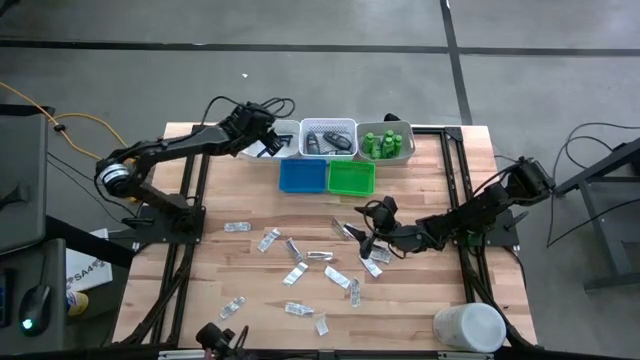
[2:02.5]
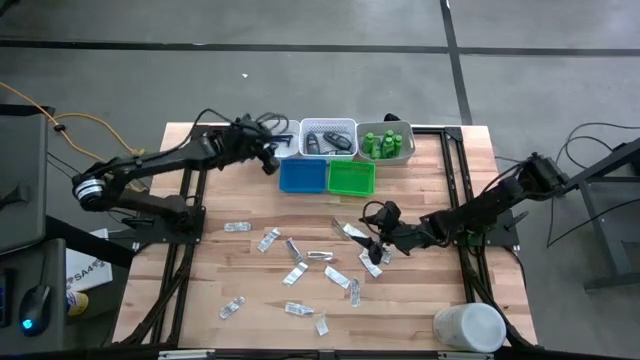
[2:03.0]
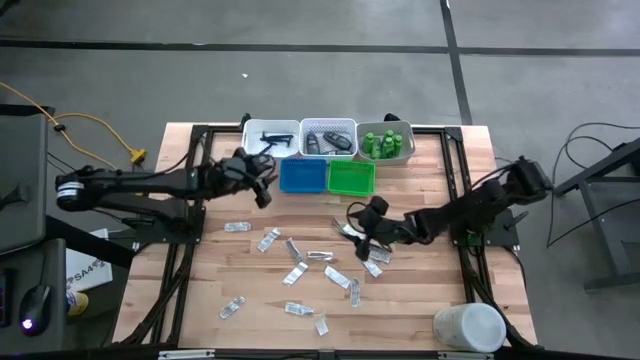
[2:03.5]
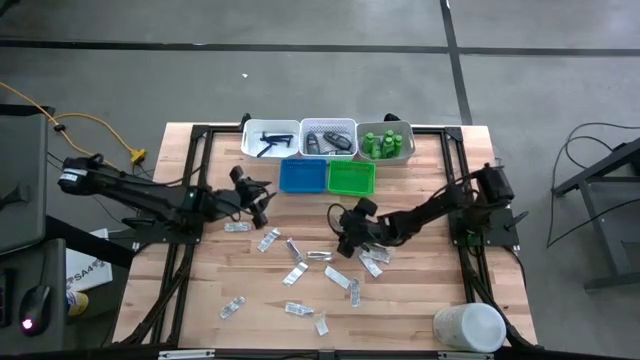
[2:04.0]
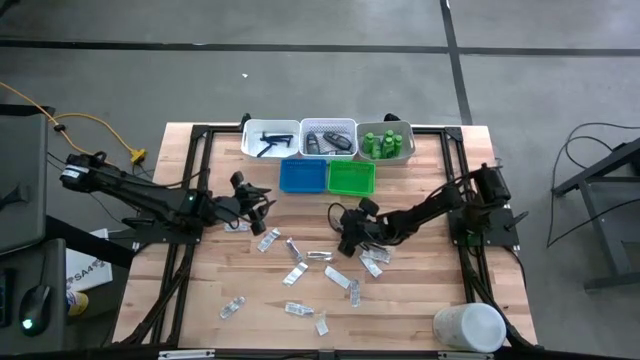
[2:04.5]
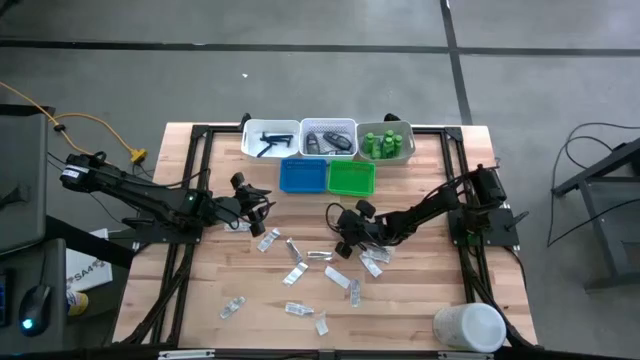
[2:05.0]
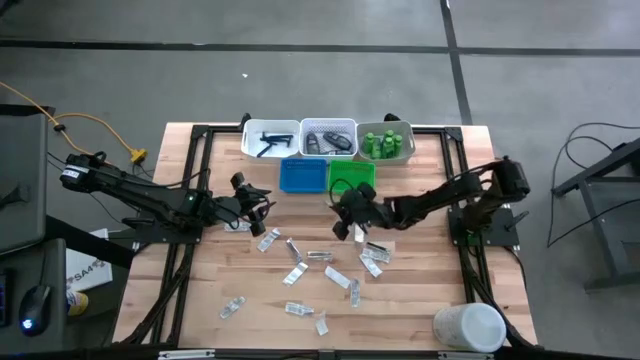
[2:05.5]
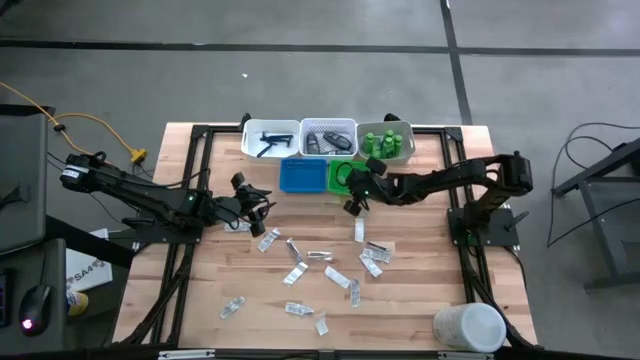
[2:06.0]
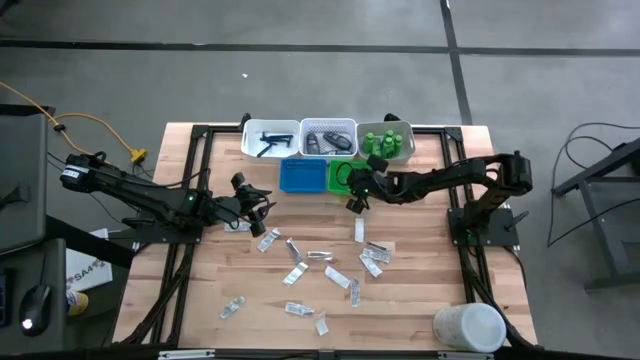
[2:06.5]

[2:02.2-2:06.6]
Task: Pick & Place Travel size toiletries
Put the silver nail clipper into the green basket

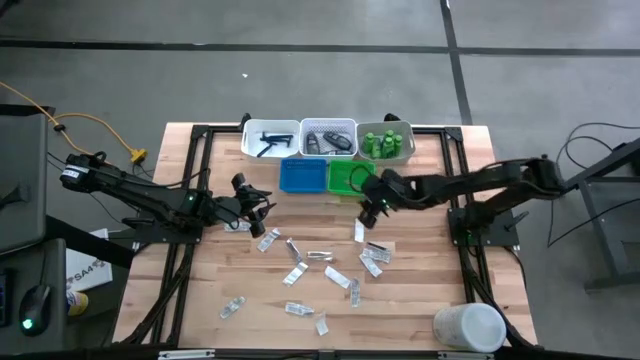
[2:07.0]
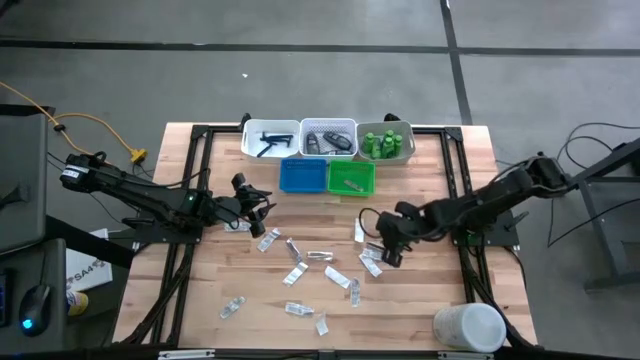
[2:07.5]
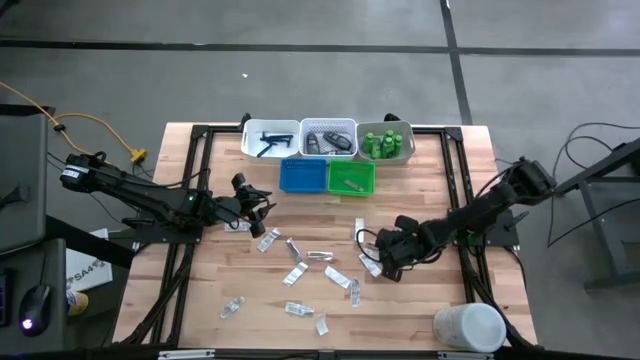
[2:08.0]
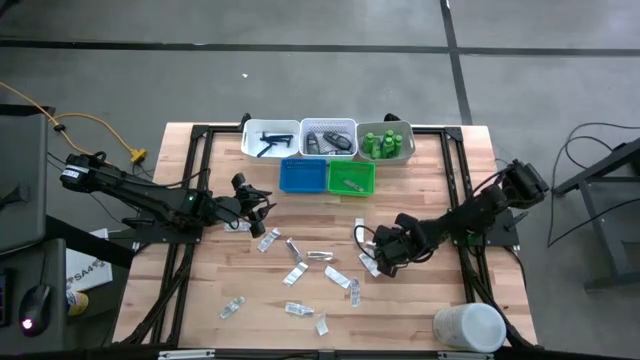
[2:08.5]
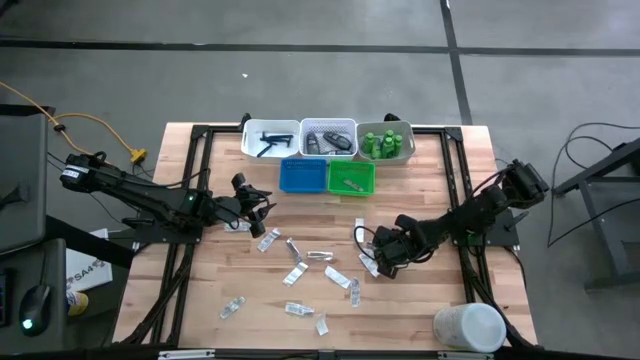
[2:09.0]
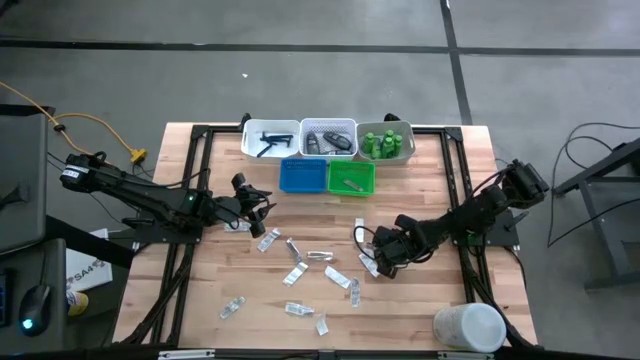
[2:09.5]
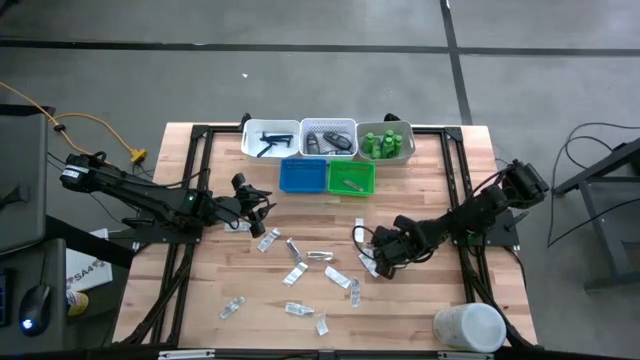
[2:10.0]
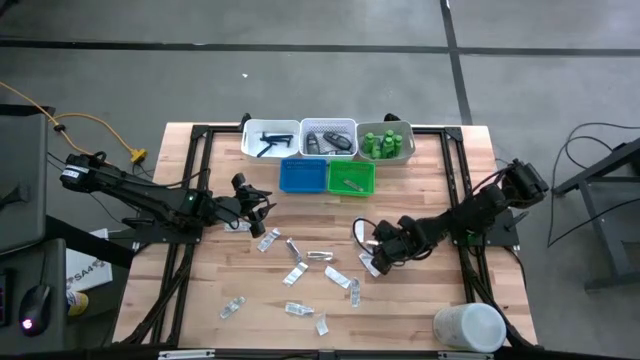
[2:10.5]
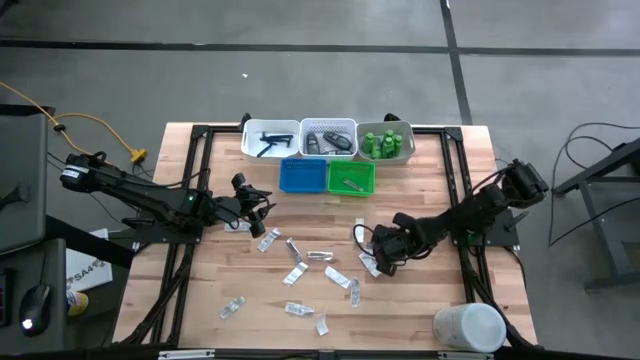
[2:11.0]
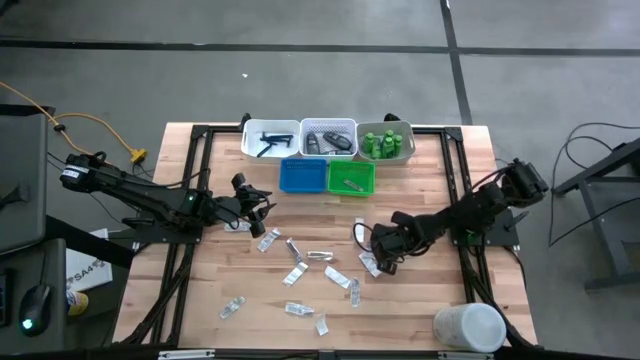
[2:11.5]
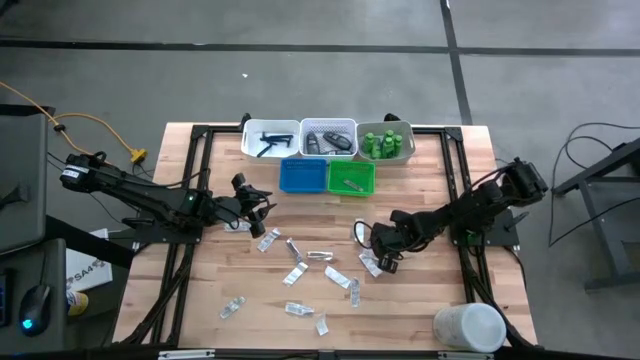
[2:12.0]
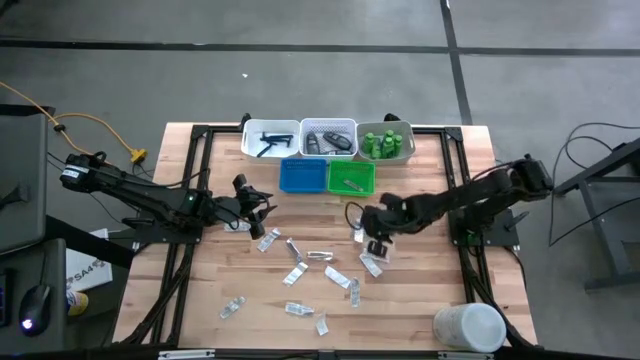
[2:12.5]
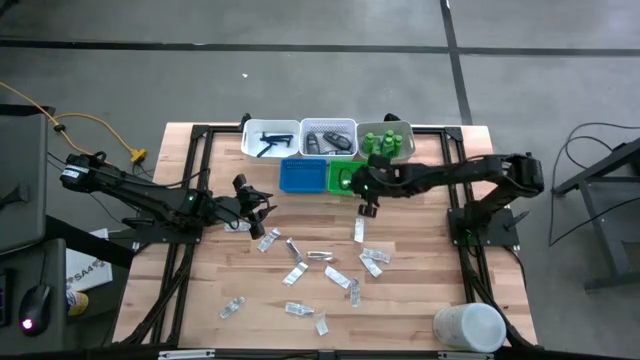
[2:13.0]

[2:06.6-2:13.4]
Put the silver nail clipper into the green basket

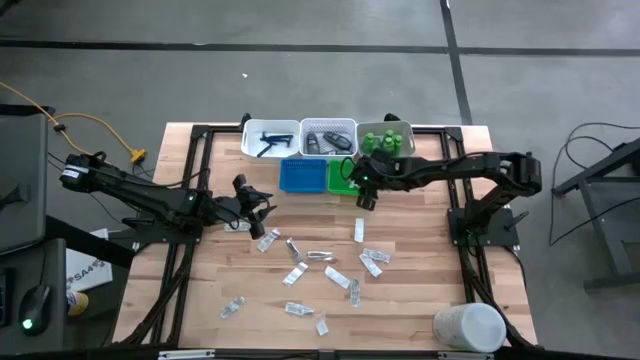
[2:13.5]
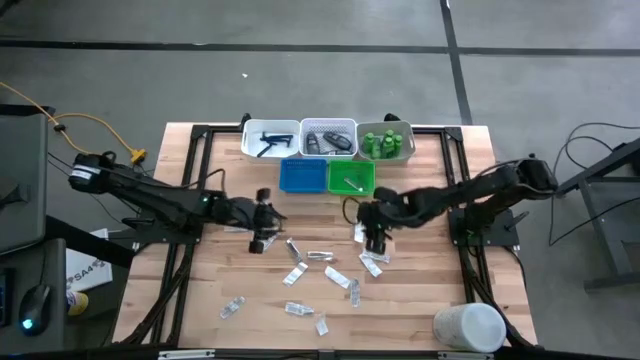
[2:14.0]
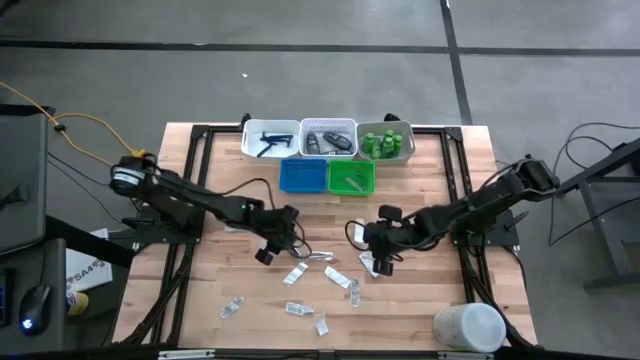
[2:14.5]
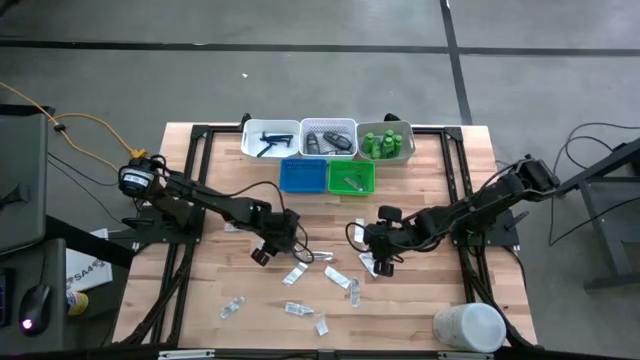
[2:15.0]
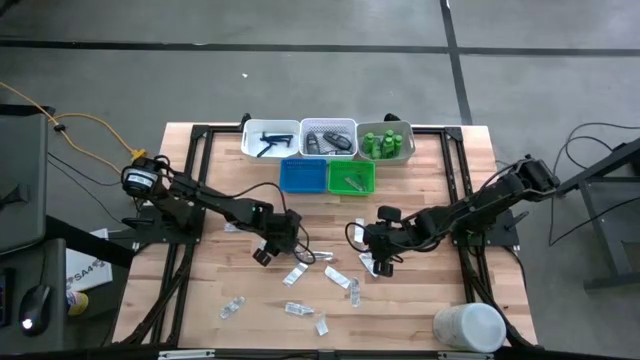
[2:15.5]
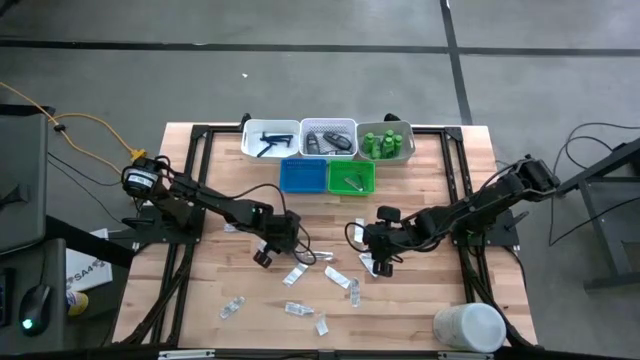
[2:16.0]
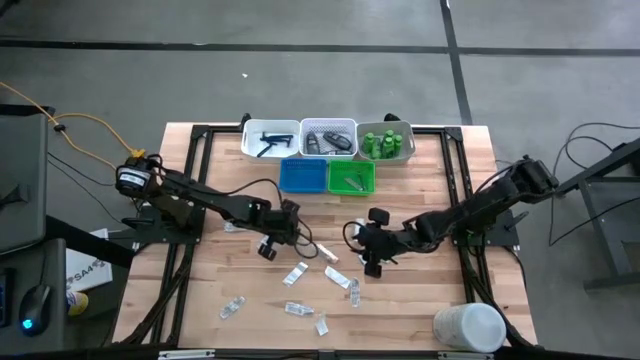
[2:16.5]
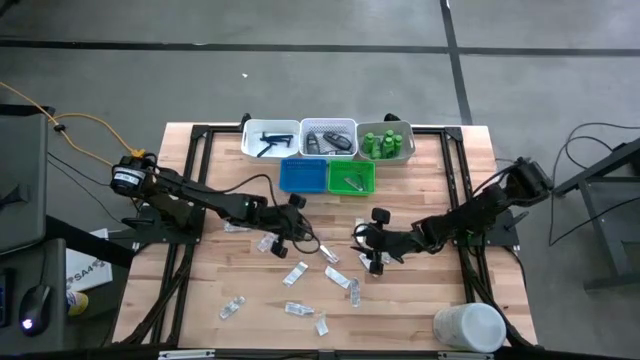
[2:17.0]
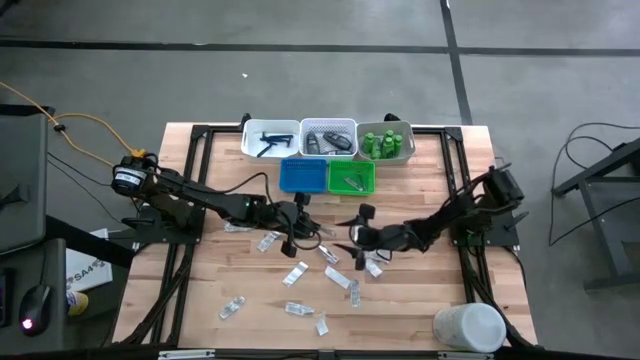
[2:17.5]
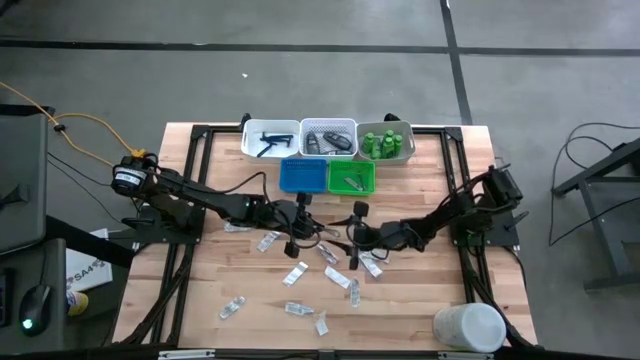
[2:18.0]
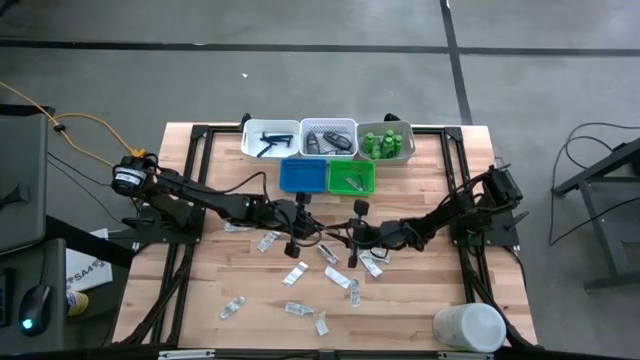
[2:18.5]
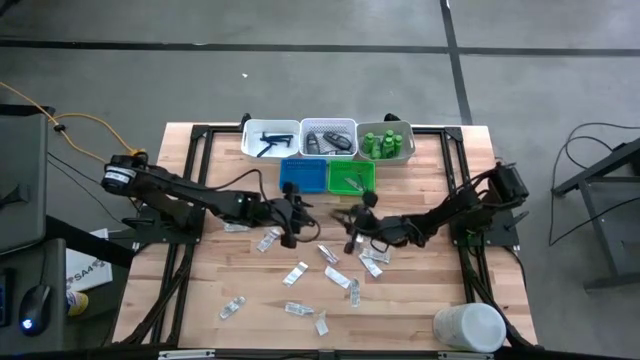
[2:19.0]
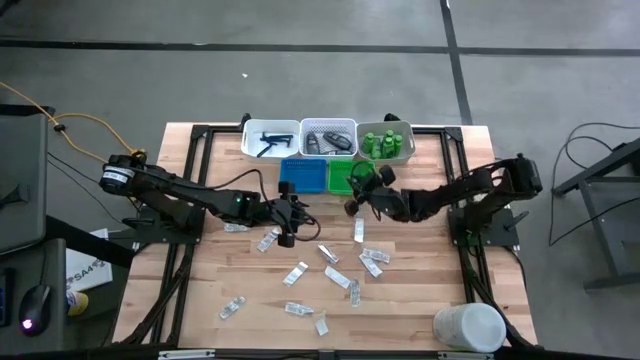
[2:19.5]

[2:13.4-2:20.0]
Put the silver nail clipper into the green basket

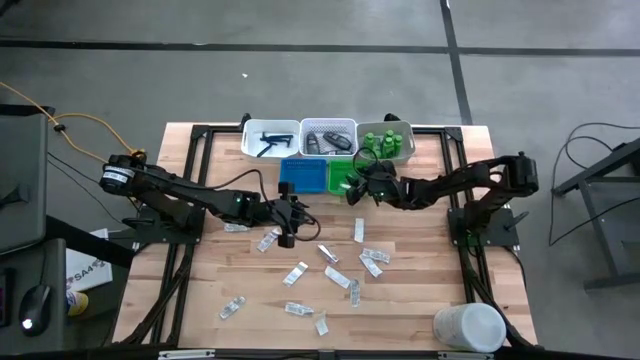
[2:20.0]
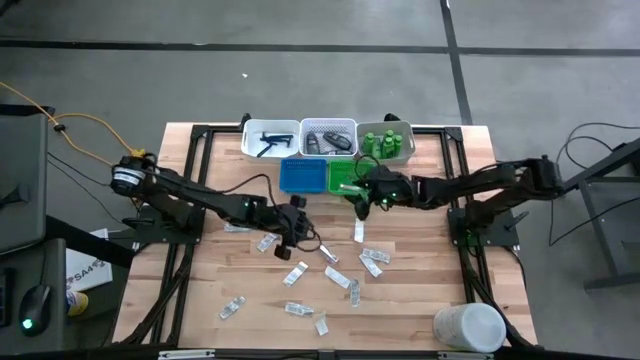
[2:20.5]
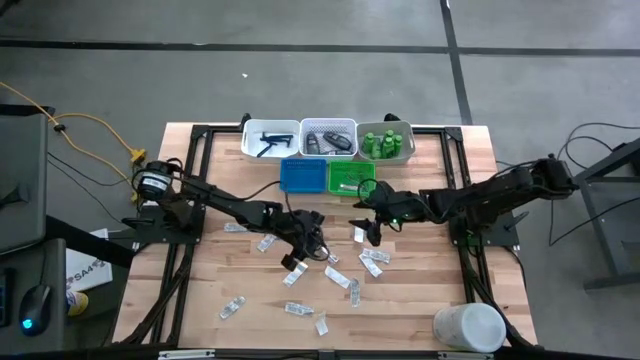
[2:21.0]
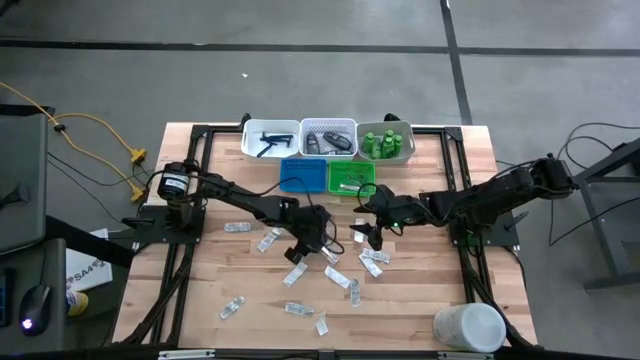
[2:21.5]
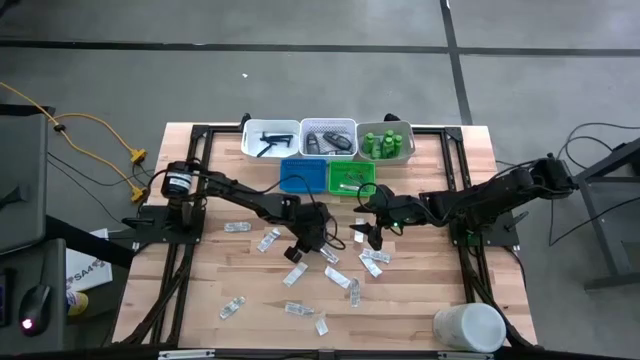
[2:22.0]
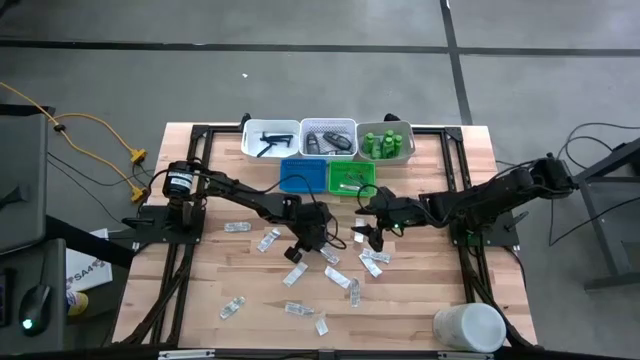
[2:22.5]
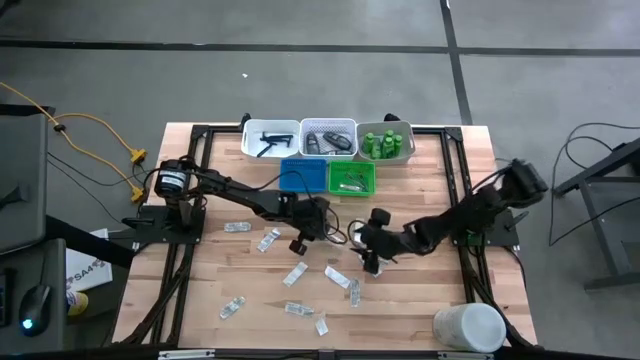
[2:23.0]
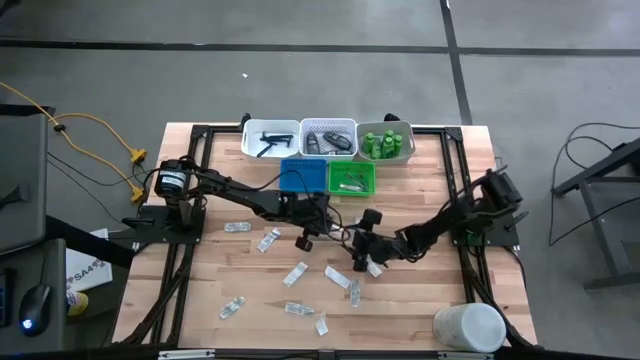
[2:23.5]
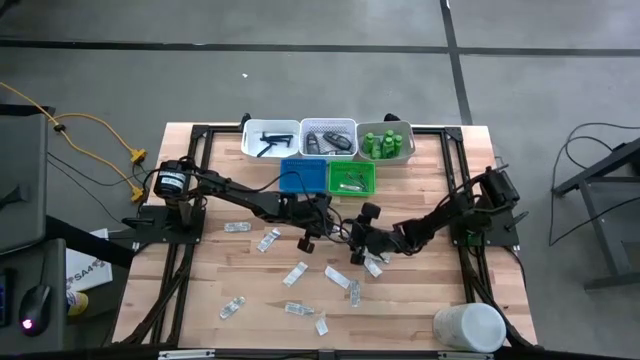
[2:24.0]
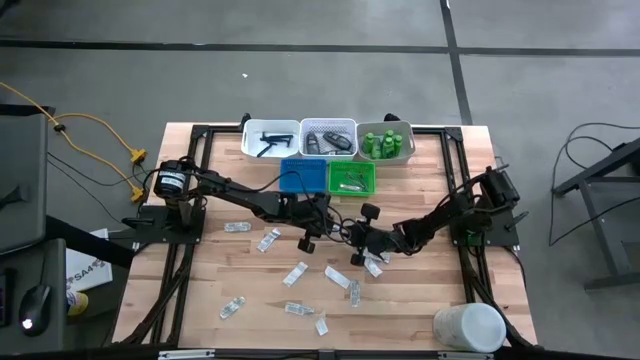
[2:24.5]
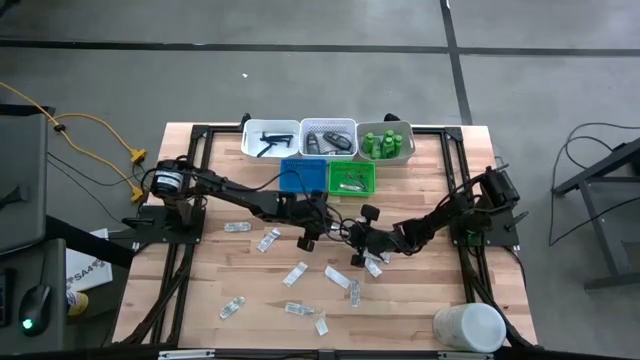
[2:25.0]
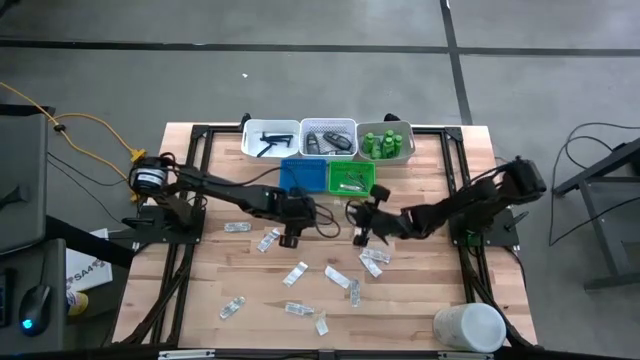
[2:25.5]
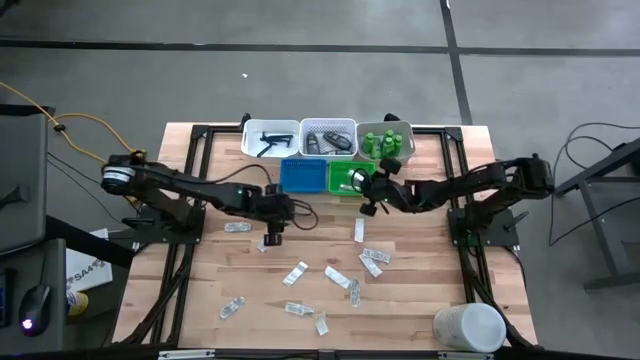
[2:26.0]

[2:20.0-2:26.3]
Put the silver nail clipper into the green basket
